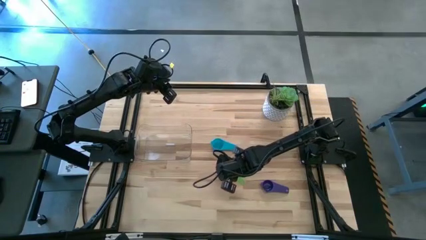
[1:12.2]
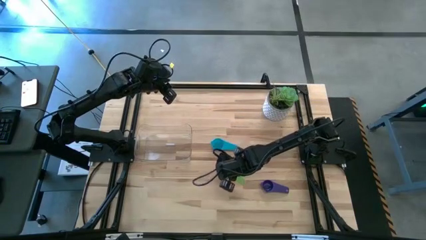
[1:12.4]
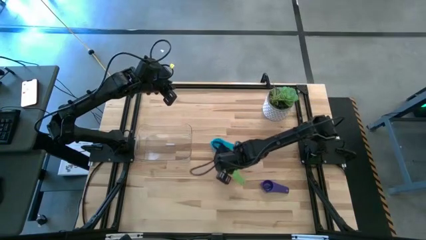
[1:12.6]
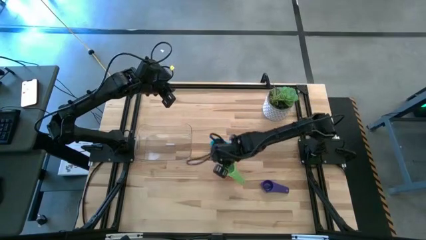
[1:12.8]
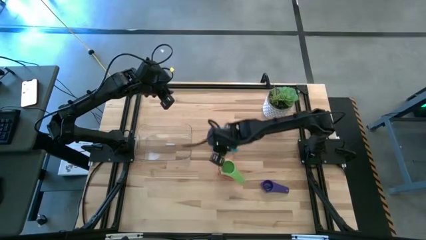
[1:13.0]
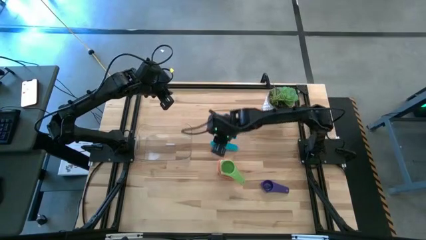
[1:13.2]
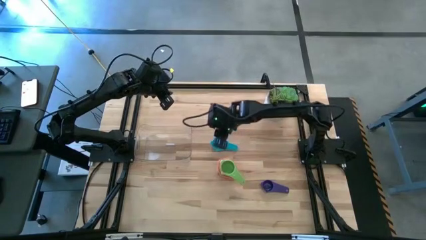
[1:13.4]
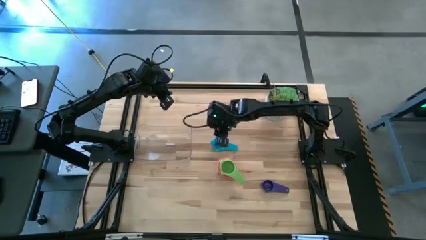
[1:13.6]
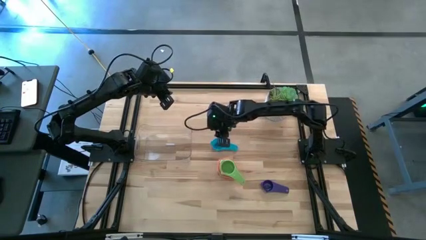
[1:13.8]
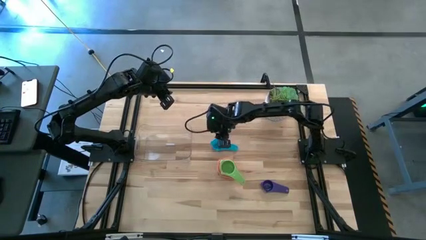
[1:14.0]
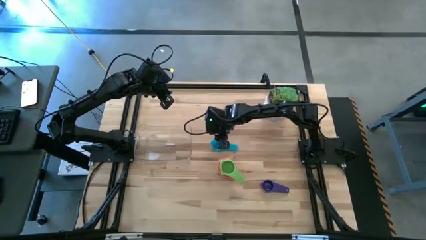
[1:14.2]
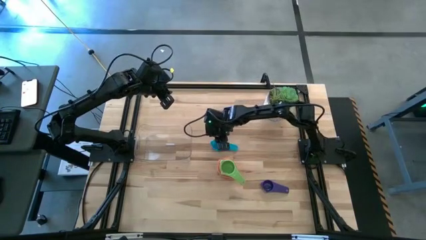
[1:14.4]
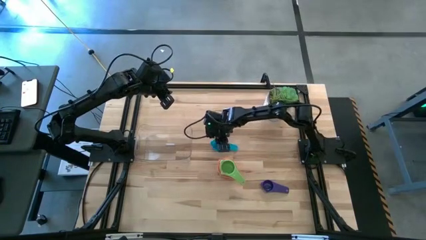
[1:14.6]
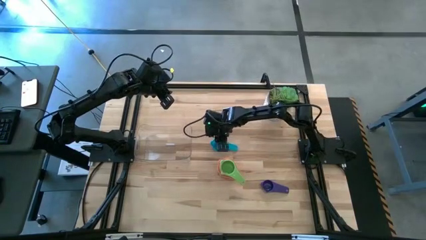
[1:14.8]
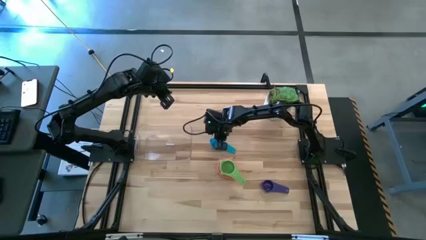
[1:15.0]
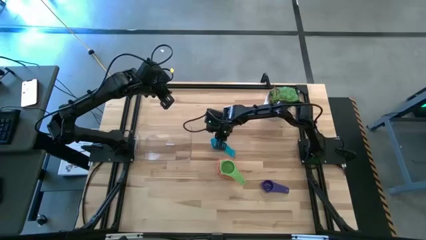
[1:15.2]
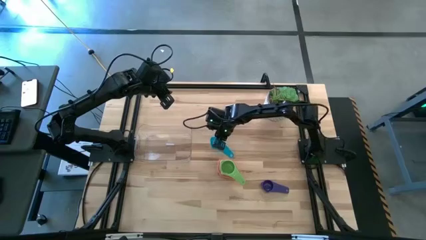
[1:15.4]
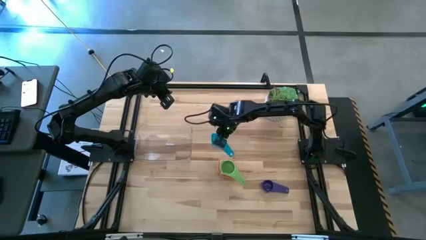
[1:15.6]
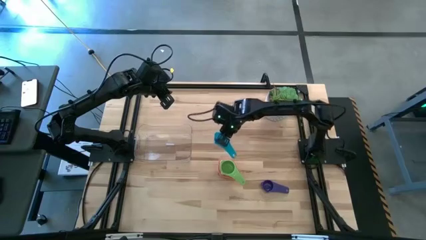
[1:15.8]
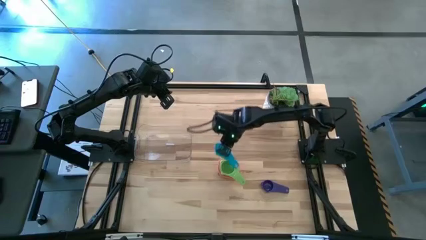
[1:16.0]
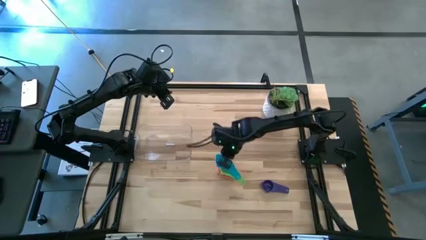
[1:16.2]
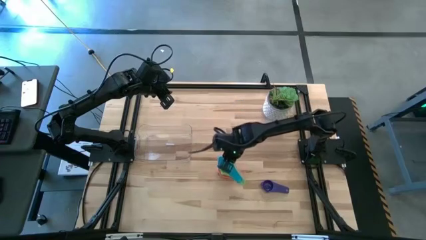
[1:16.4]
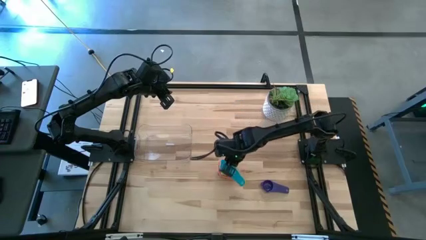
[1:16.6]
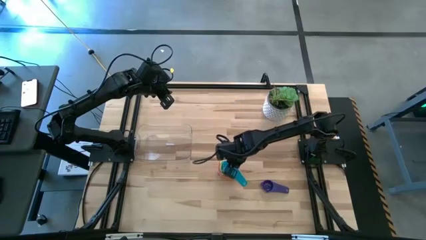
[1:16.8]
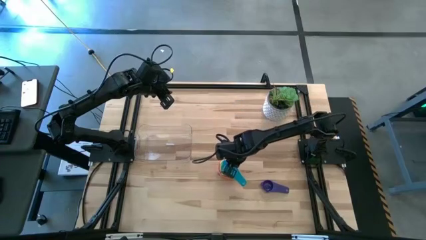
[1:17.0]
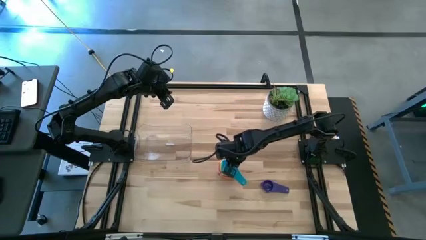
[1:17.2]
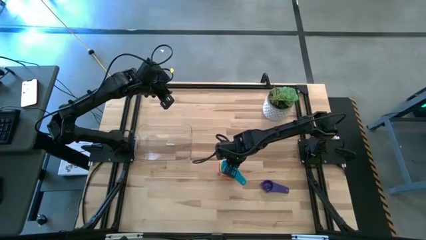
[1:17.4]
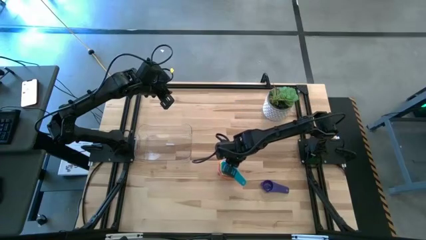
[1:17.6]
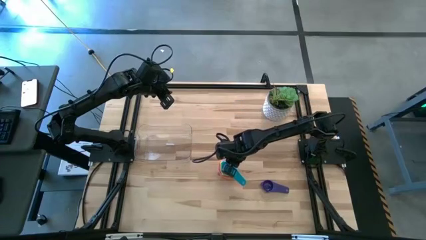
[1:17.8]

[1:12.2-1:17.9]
Task: Nest measuring cups in basket
Stack the light blue measuring cup into the green stacked measuring cups

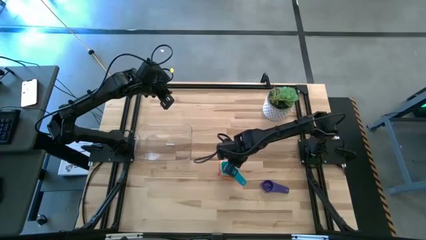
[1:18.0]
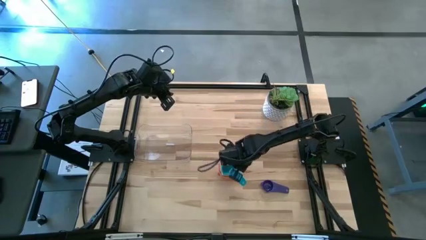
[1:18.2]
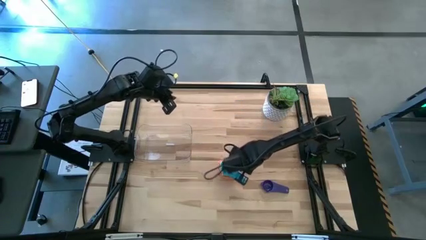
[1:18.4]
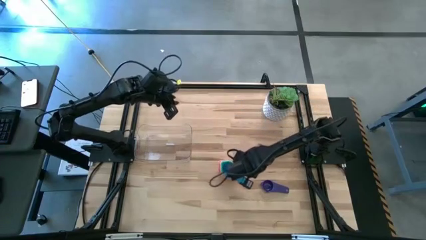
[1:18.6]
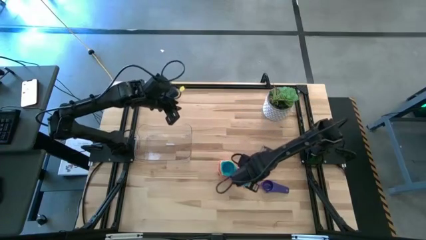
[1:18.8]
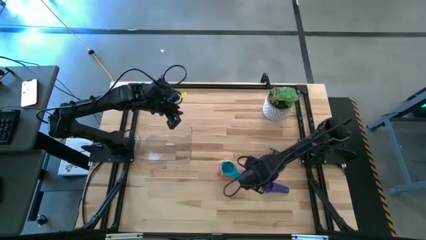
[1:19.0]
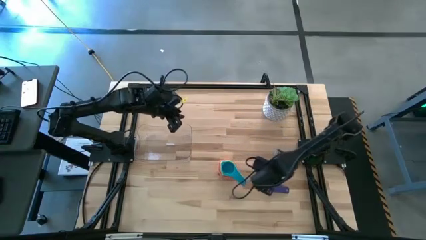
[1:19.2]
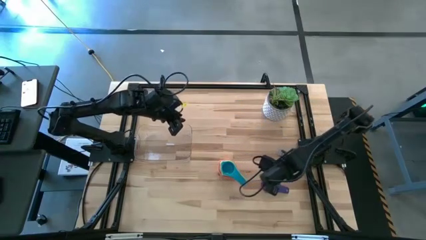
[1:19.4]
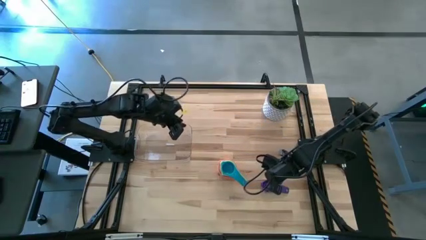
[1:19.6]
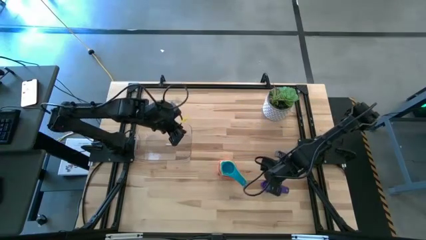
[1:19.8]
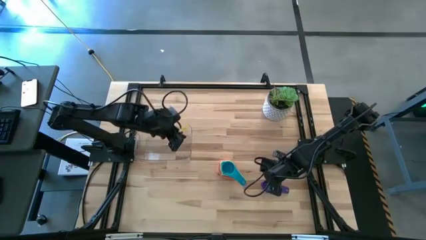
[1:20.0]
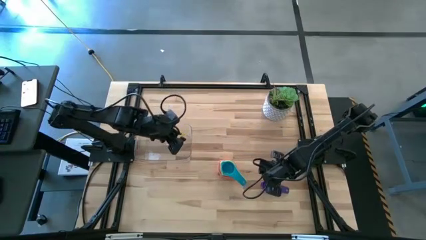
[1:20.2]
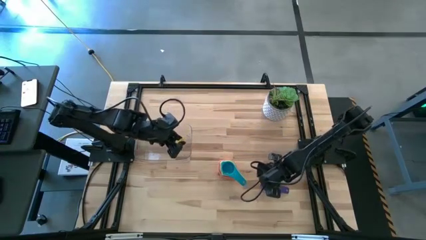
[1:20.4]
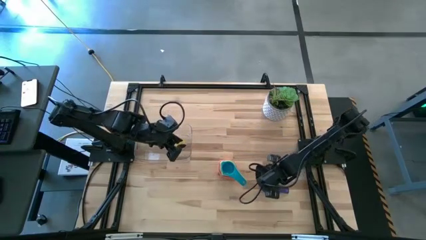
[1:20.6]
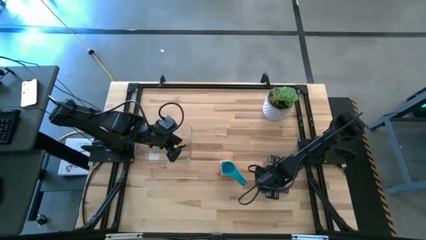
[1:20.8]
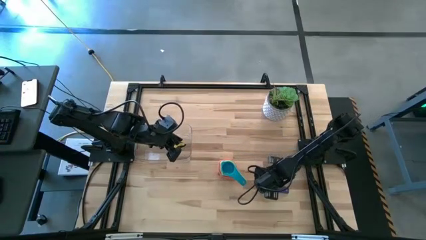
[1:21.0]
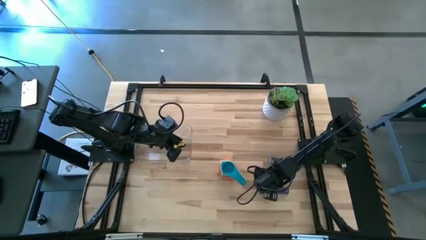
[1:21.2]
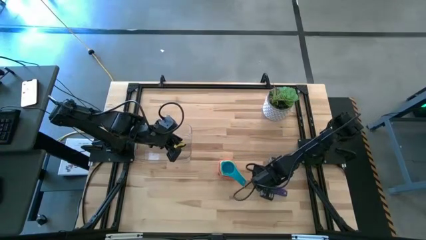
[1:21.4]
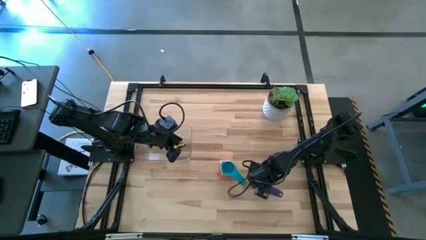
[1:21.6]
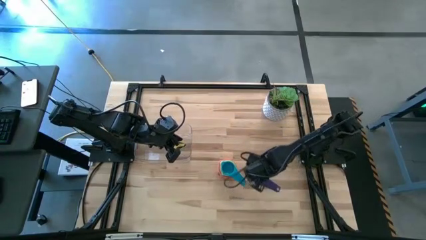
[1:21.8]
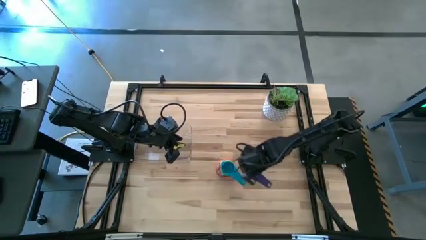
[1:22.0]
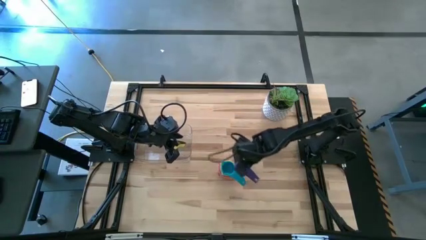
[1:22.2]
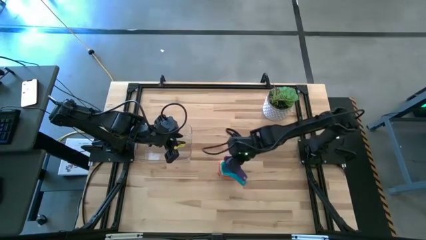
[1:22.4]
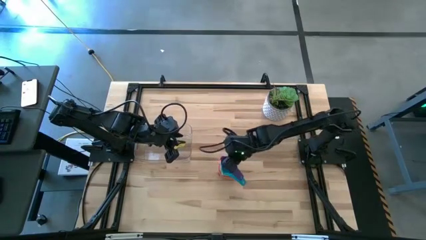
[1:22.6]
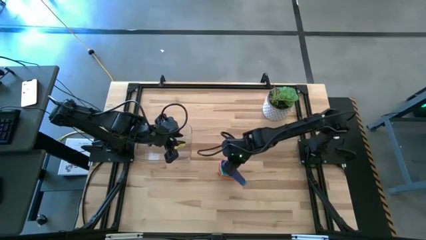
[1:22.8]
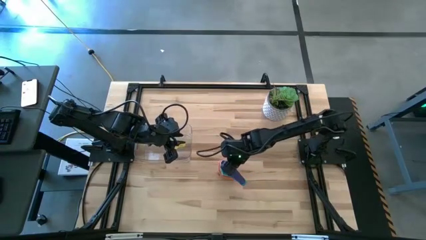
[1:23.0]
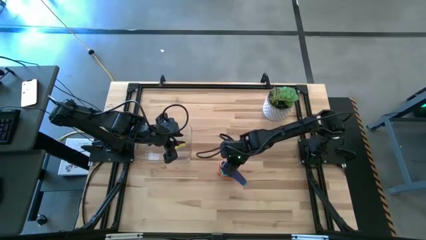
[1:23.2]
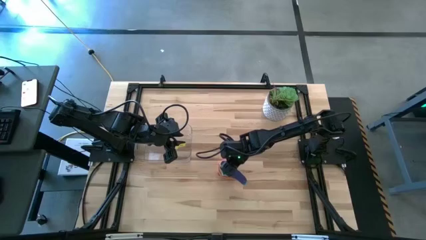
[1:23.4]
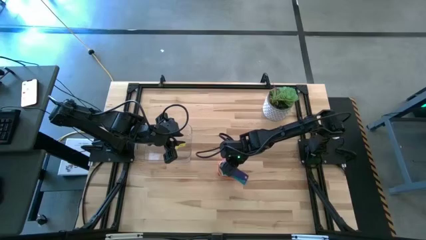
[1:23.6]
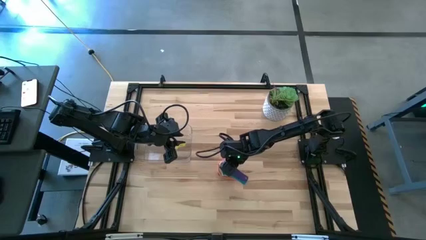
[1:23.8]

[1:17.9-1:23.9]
Stack the dark blue measuring cup into the light blue stacked measuring cups
